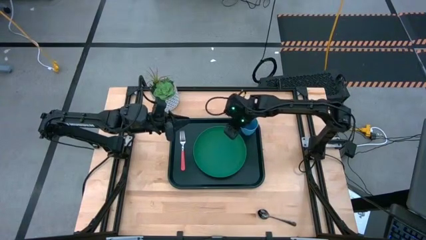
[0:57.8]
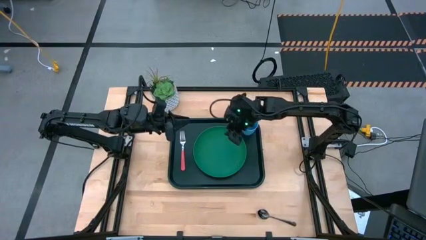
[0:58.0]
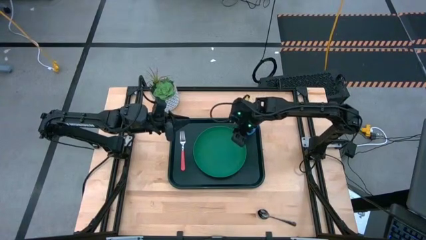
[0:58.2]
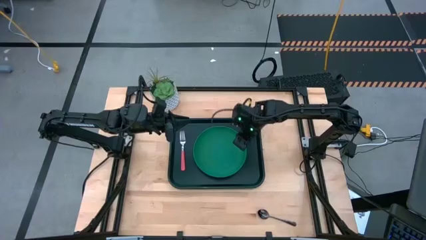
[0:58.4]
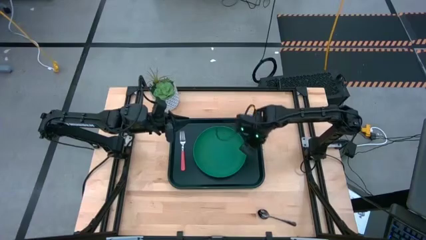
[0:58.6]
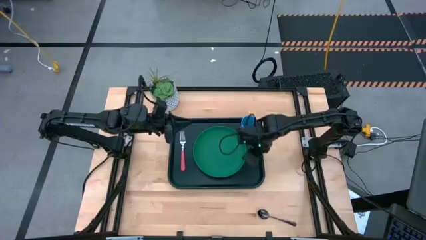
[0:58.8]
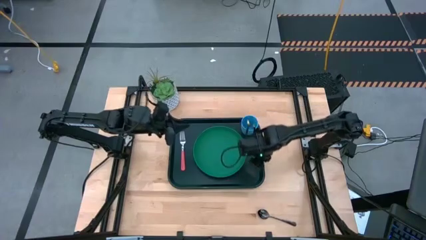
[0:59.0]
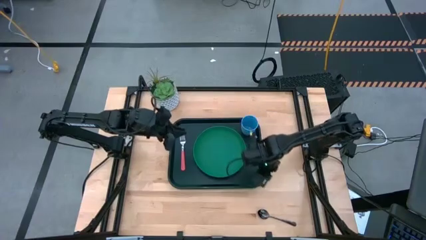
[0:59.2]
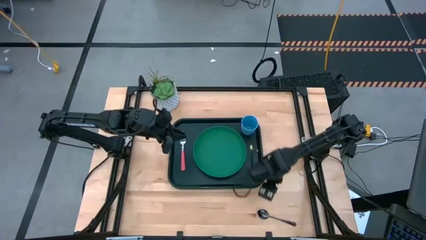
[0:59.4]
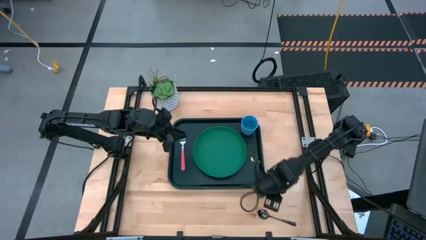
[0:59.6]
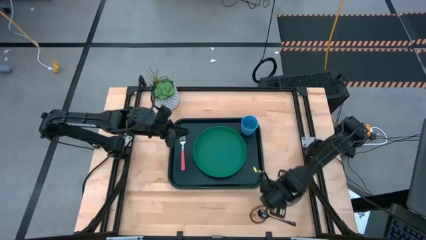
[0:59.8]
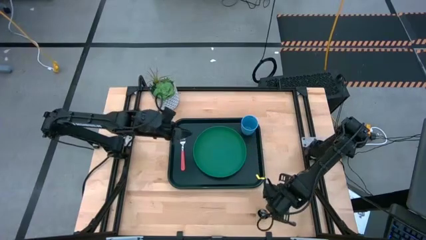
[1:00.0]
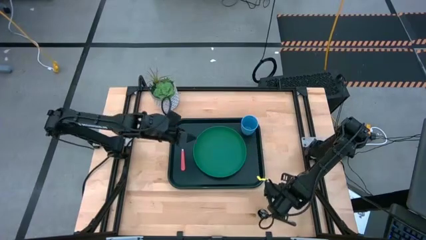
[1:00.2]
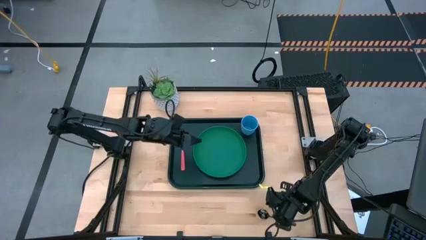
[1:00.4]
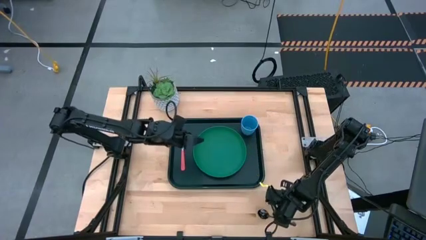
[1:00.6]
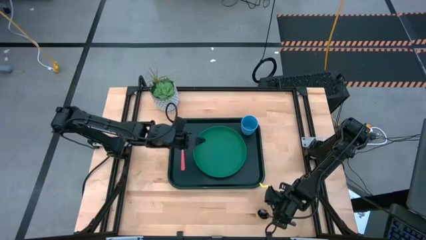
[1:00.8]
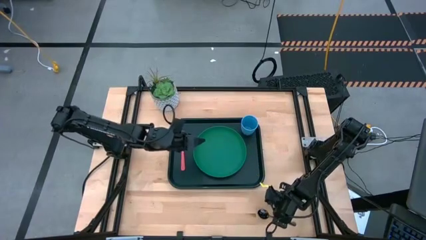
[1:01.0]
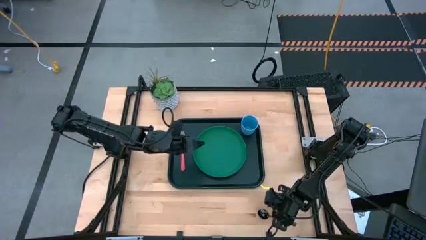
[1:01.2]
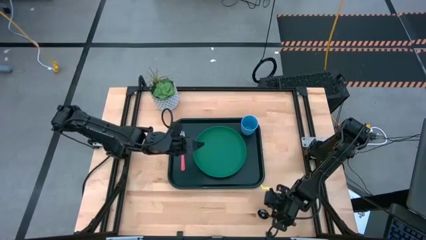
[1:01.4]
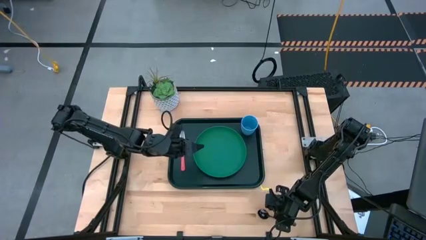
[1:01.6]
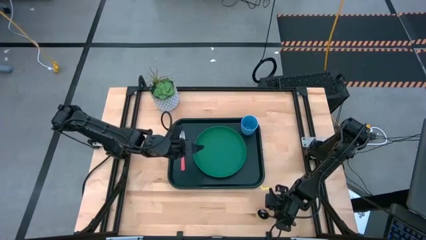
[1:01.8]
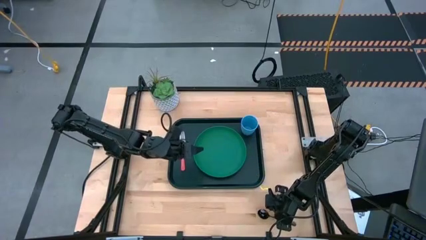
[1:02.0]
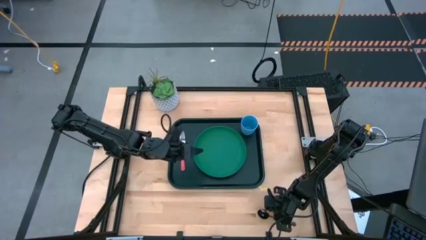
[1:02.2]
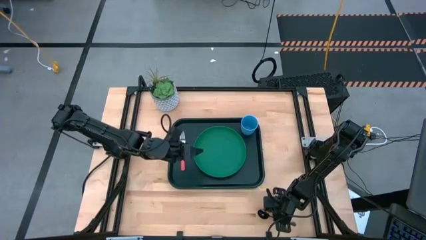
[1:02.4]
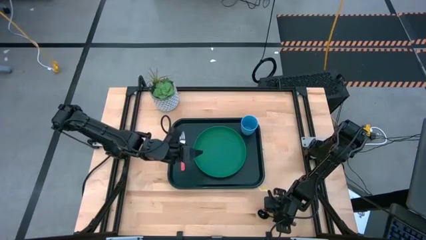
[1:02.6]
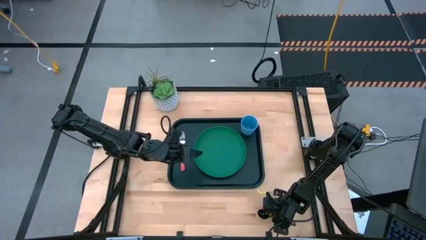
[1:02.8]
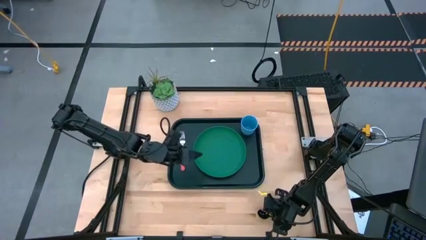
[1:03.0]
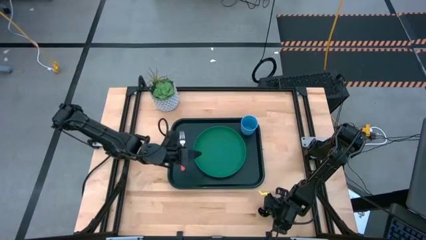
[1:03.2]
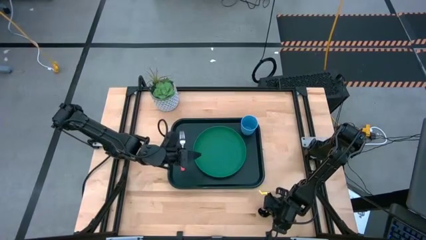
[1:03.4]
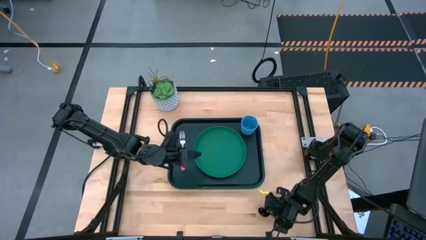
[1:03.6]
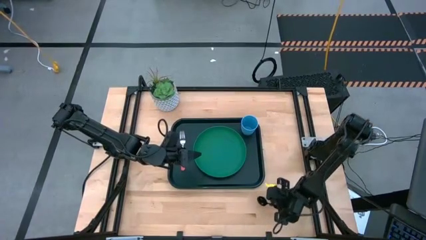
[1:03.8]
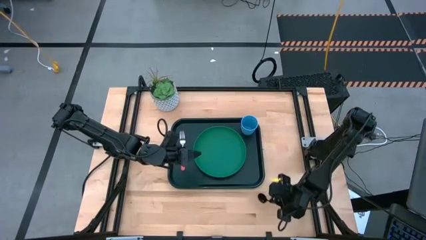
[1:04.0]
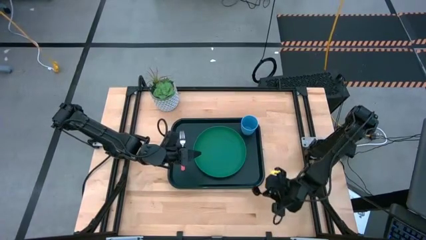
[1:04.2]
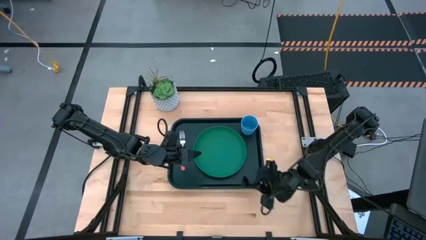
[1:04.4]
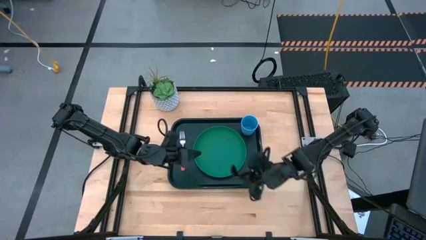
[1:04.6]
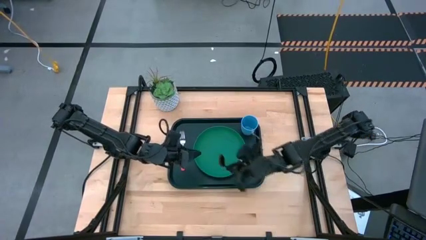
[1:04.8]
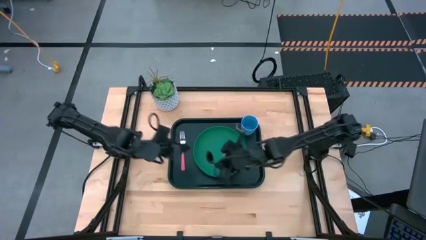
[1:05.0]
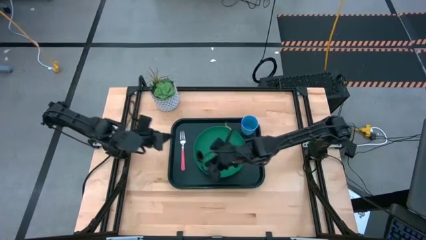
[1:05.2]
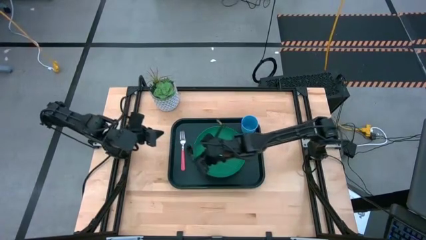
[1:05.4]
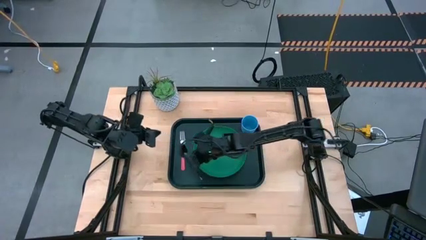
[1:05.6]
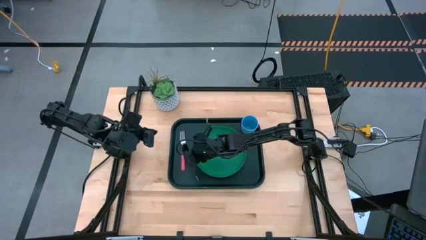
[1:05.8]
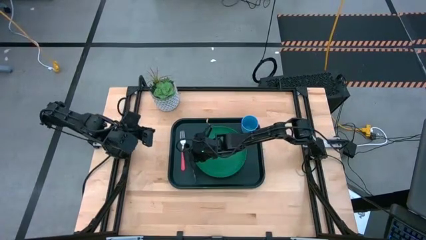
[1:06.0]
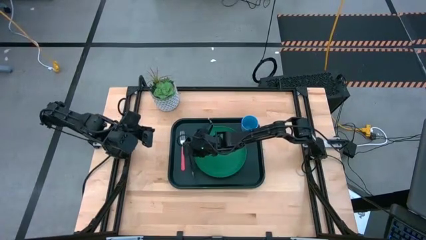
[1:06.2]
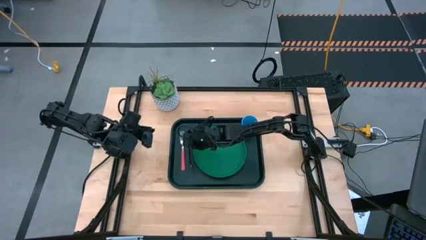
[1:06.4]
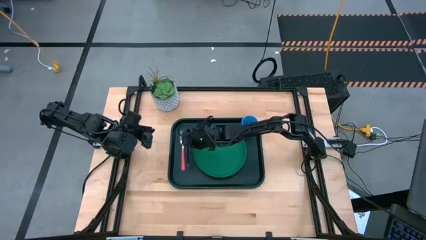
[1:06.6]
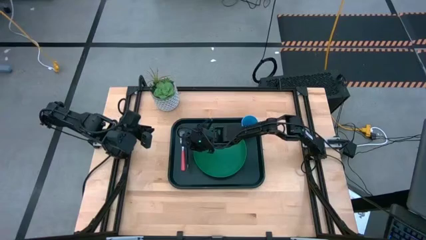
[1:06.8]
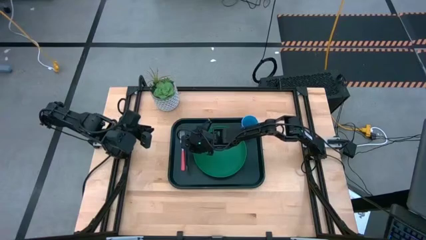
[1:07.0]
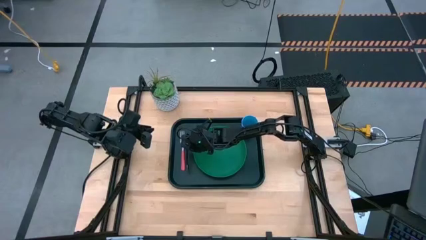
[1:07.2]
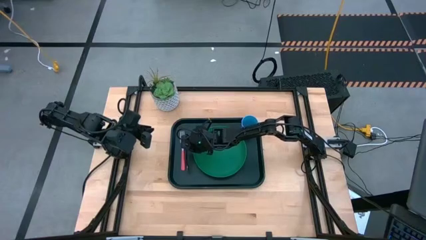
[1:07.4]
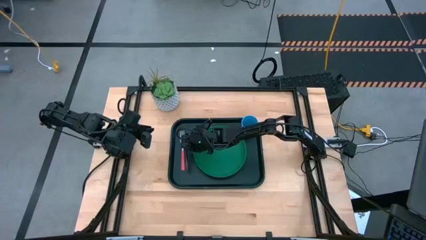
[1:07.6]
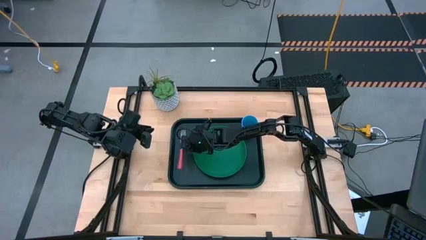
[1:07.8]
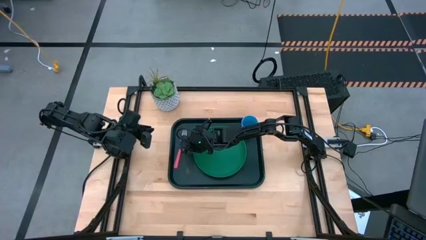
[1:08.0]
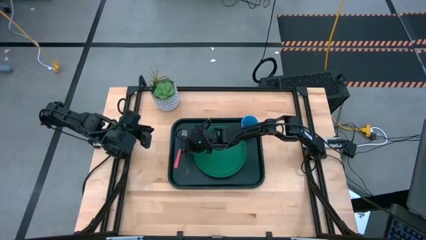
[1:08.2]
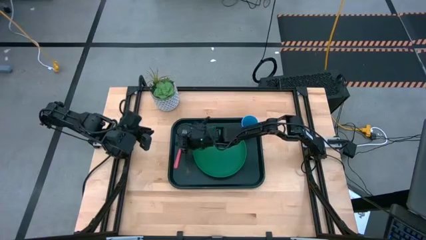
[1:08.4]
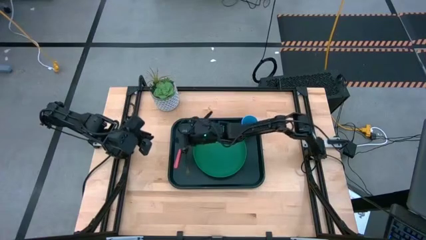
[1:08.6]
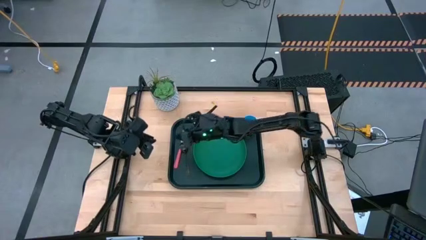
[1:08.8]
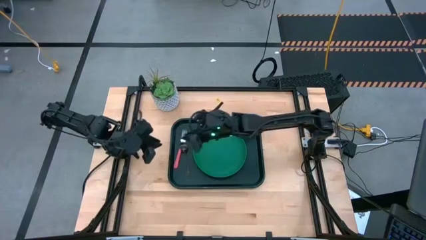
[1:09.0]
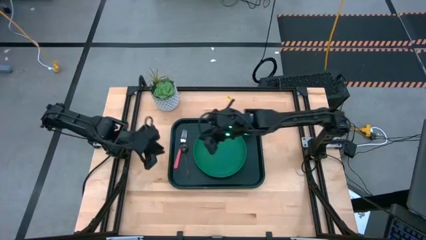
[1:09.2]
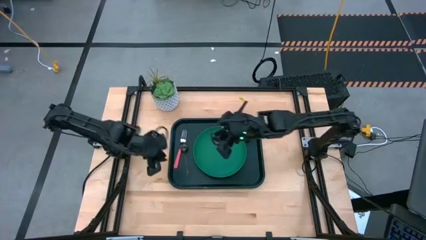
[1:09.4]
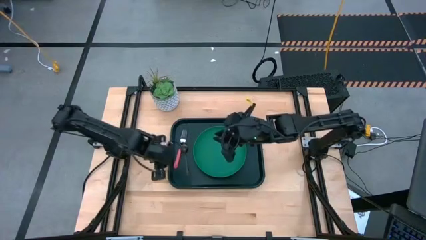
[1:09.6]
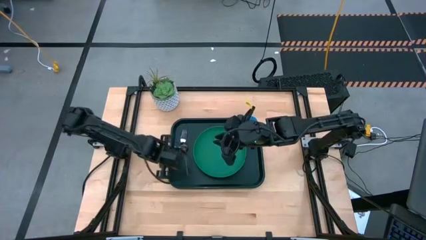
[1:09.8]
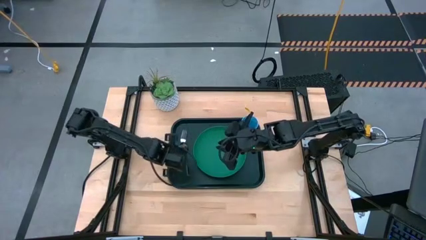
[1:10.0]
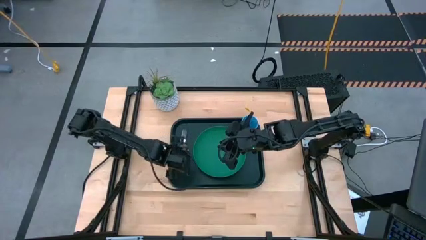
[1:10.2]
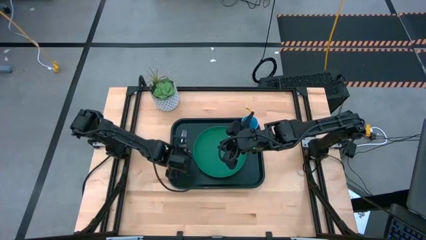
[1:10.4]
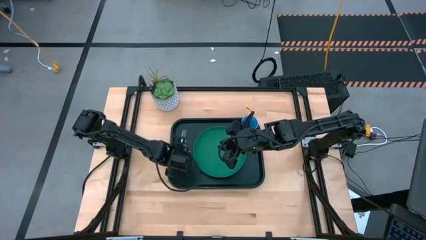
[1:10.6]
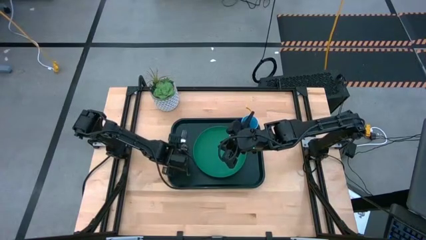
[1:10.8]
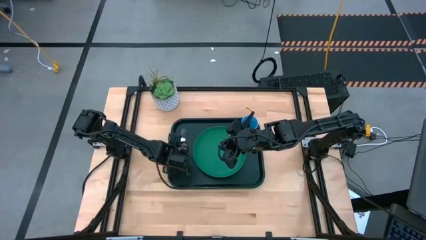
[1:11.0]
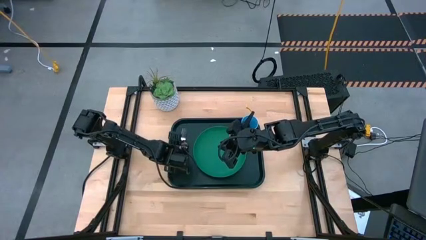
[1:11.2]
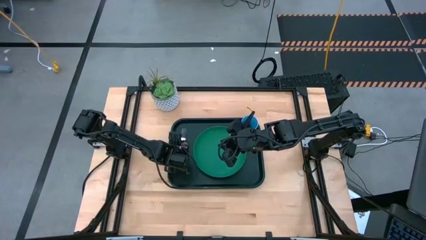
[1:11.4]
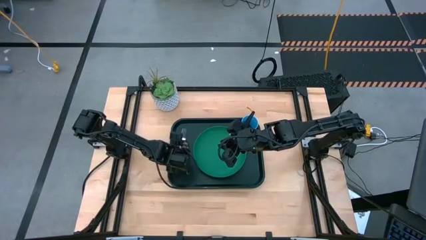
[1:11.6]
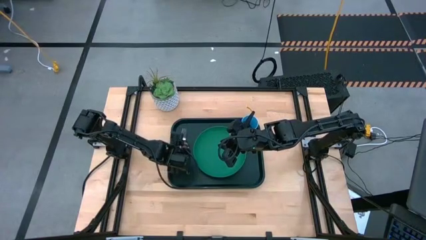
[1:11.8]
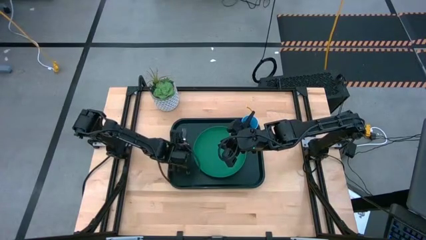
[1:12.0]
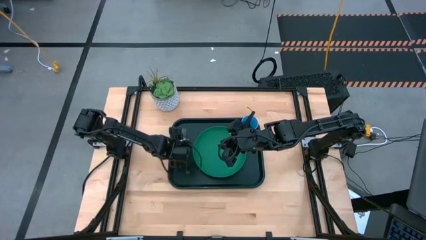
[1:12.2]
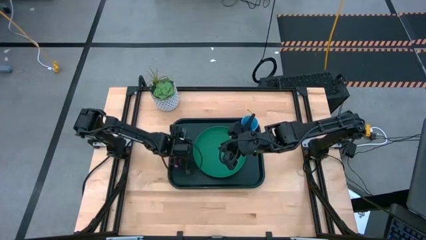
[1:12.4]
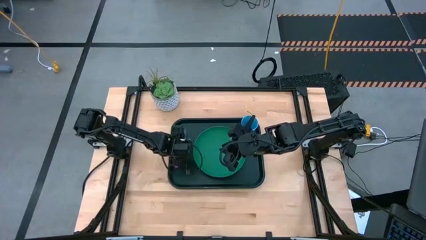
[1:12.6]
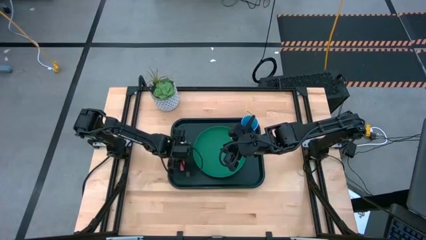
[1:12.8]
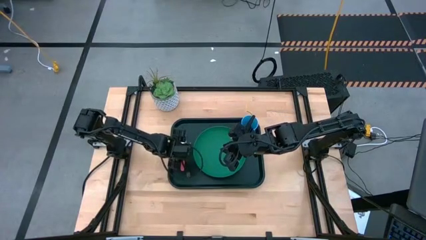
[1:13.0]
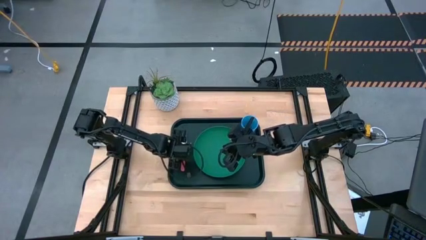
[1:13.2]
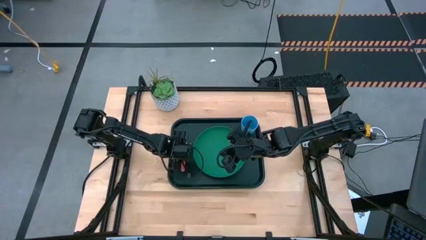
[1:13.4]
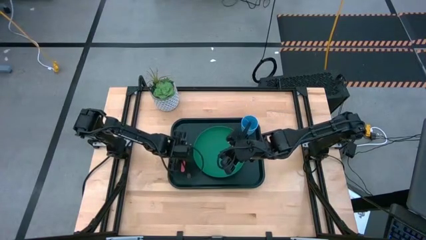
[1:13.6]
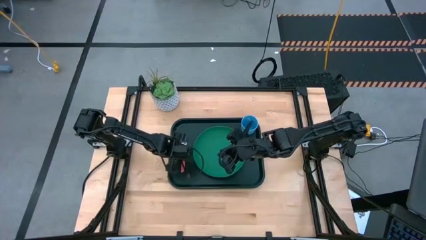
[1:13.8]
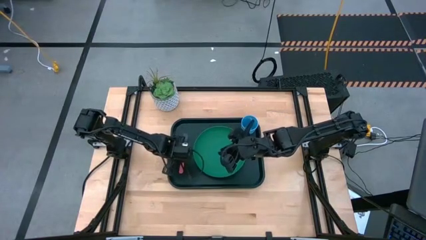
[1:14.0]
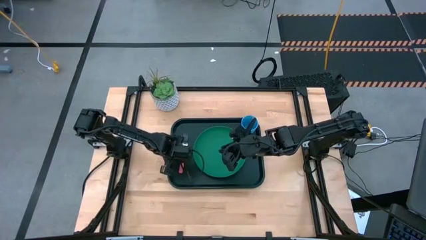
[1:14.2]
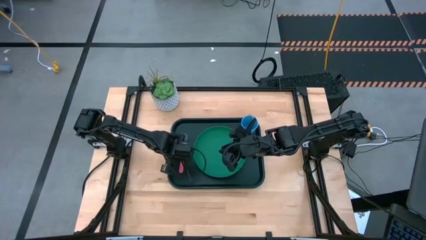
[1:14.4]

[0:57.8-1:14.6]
Task: Pick and place plate/cup/fork/spoon on tray
Put the black spoon on the dark green serving tray to the right of the pink fork
